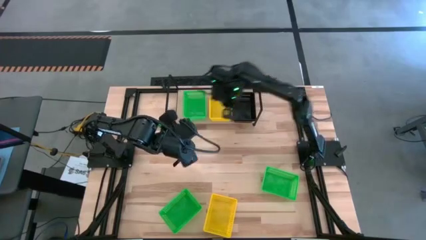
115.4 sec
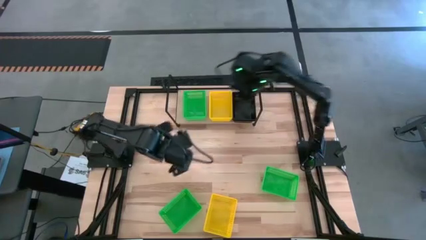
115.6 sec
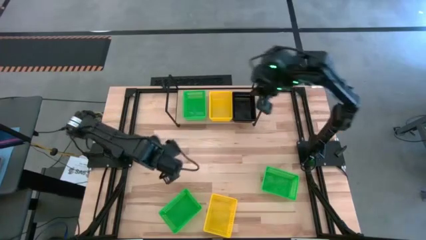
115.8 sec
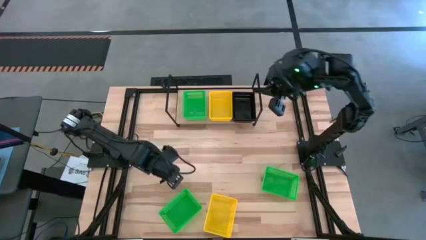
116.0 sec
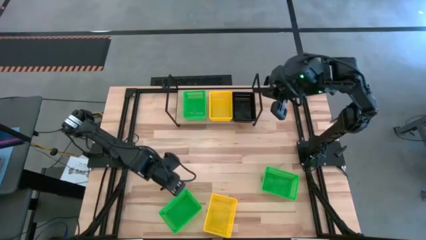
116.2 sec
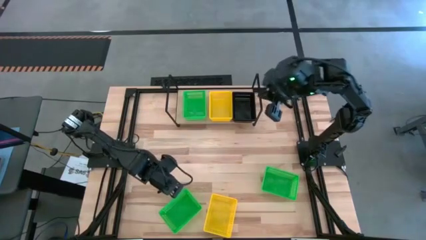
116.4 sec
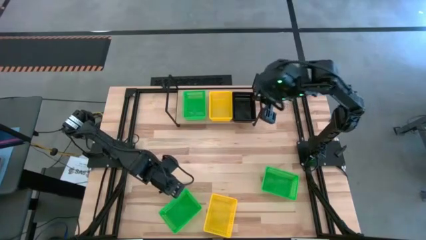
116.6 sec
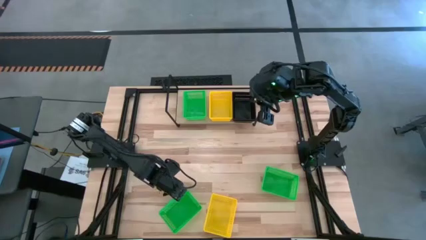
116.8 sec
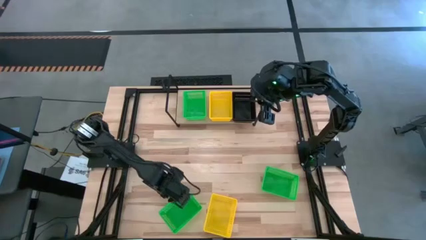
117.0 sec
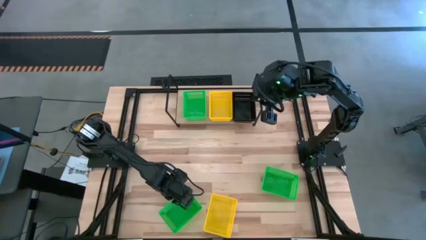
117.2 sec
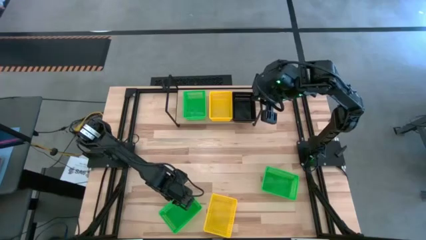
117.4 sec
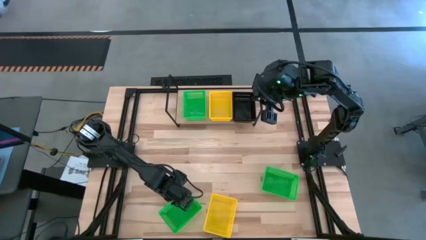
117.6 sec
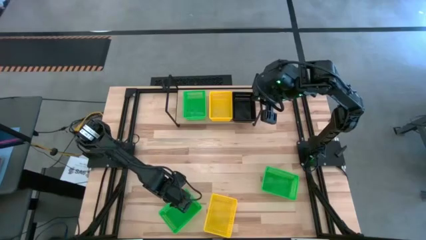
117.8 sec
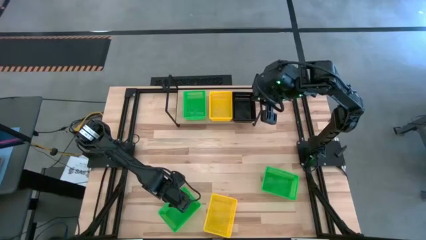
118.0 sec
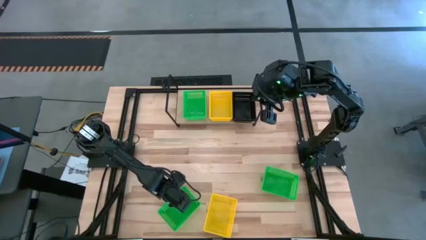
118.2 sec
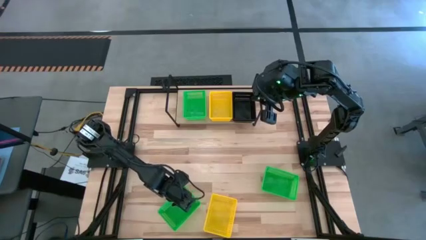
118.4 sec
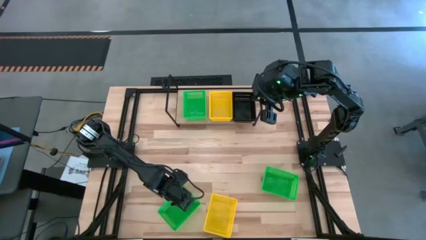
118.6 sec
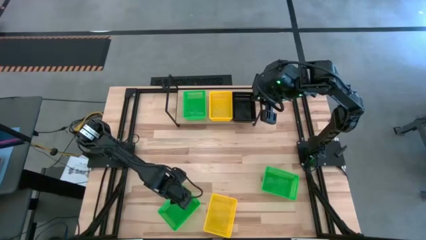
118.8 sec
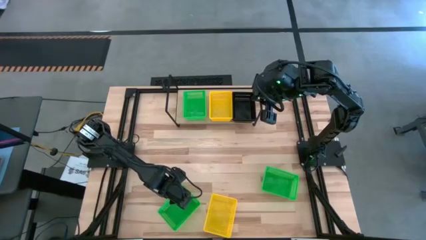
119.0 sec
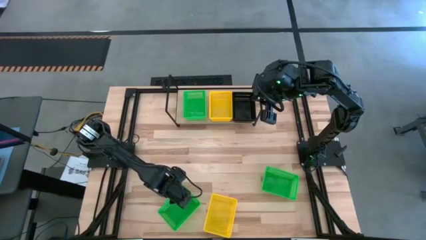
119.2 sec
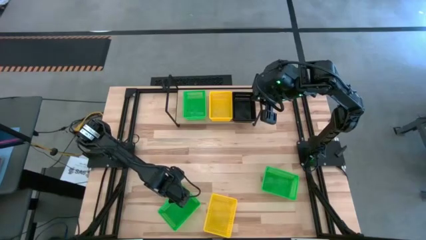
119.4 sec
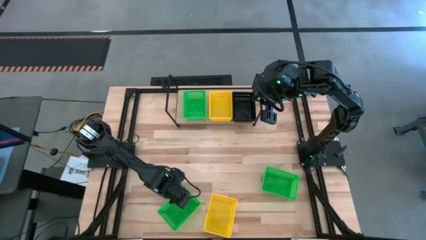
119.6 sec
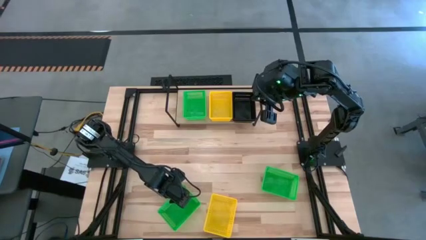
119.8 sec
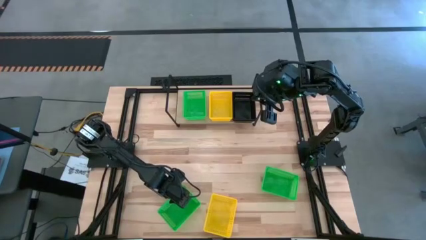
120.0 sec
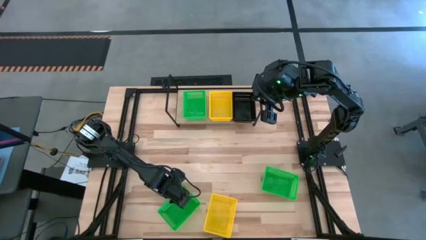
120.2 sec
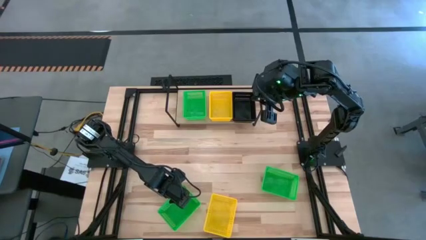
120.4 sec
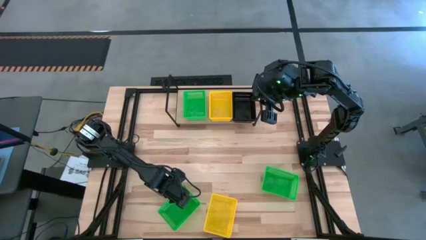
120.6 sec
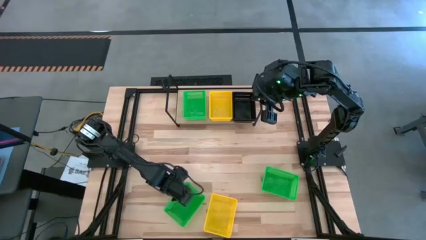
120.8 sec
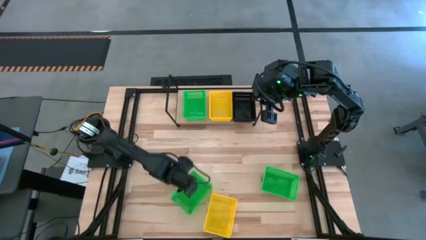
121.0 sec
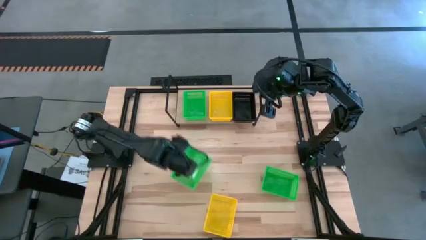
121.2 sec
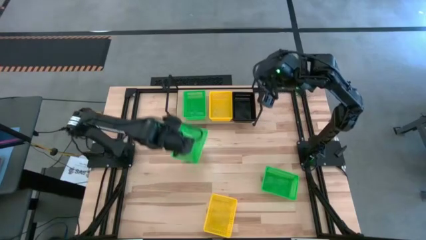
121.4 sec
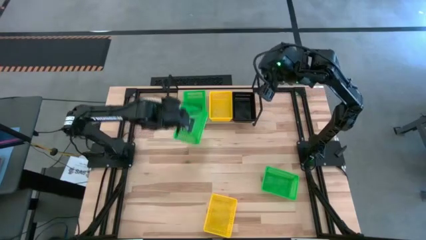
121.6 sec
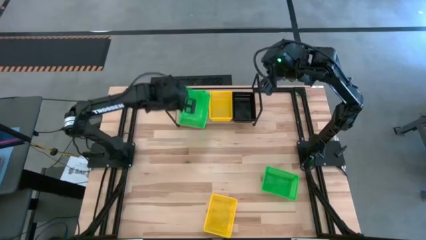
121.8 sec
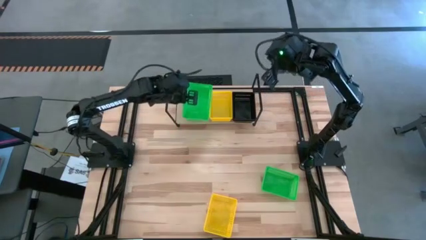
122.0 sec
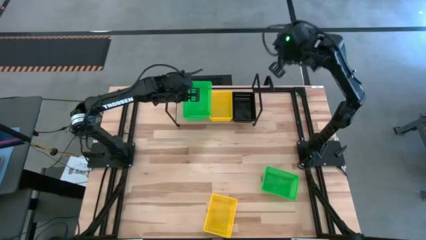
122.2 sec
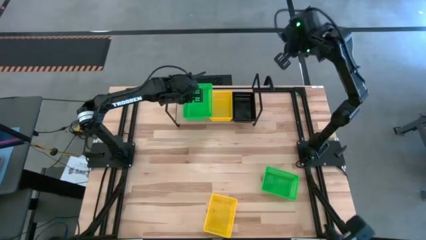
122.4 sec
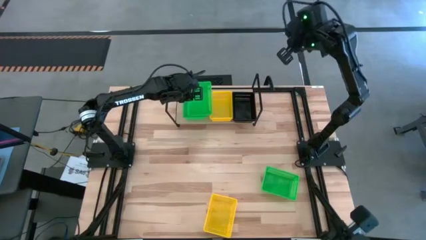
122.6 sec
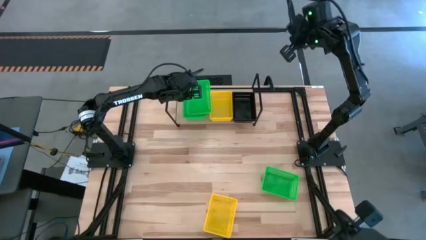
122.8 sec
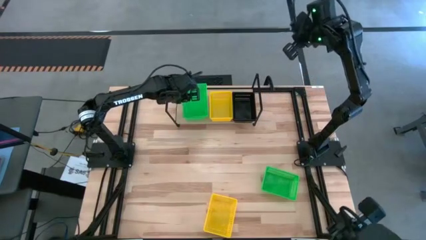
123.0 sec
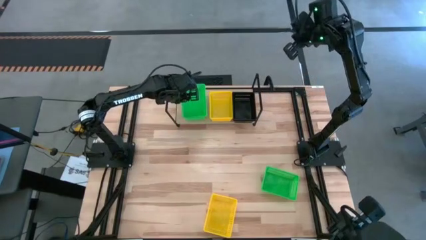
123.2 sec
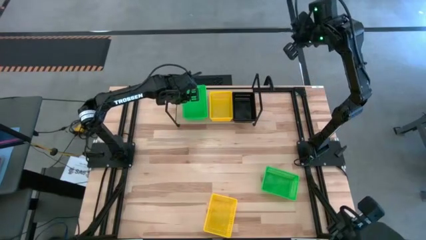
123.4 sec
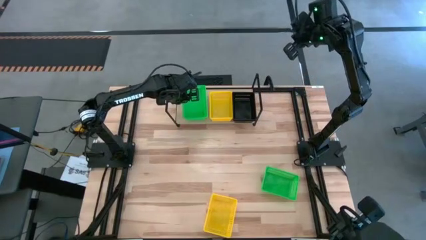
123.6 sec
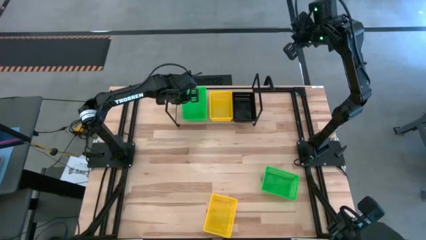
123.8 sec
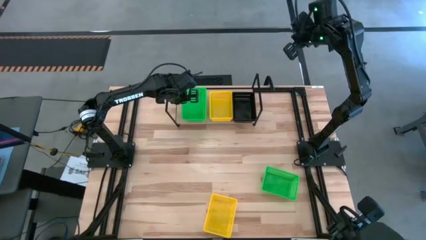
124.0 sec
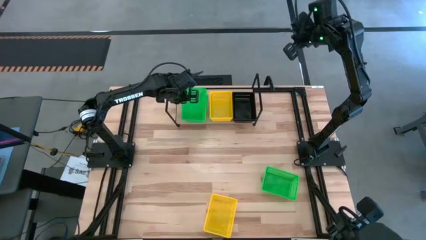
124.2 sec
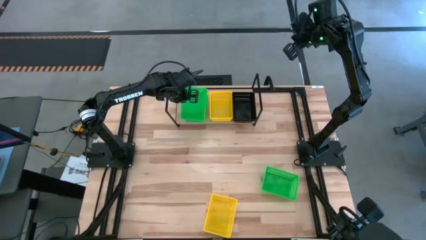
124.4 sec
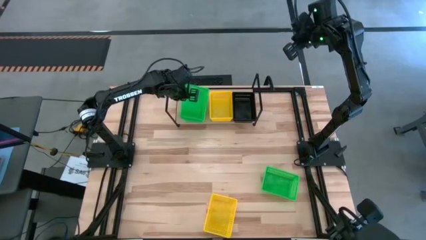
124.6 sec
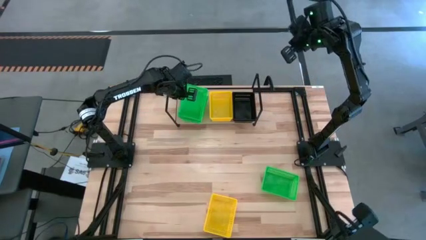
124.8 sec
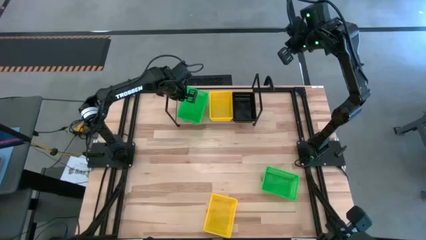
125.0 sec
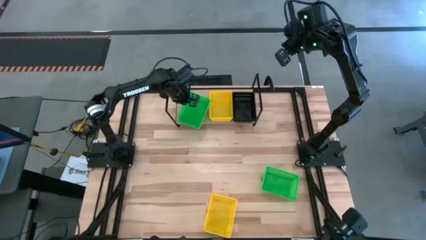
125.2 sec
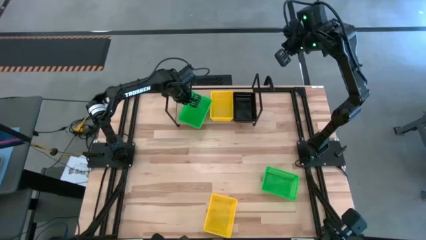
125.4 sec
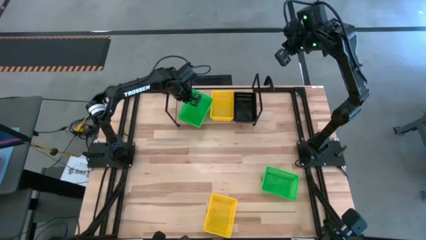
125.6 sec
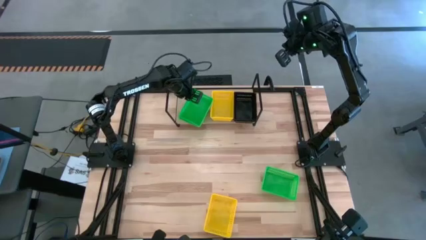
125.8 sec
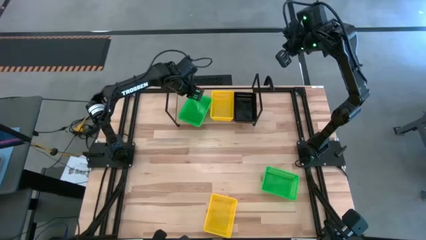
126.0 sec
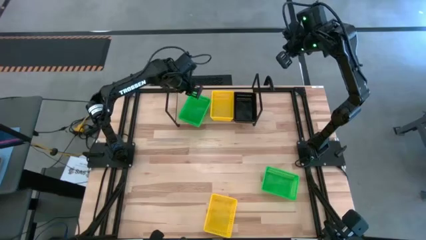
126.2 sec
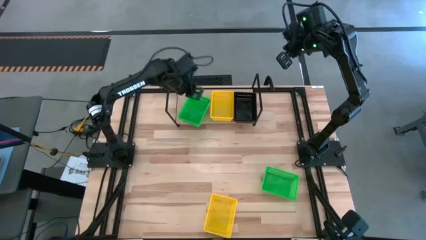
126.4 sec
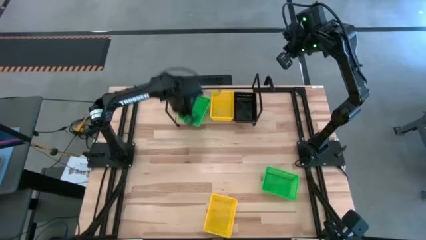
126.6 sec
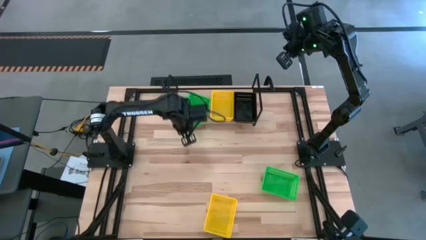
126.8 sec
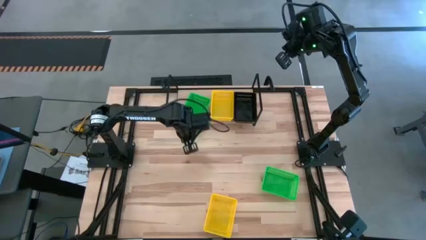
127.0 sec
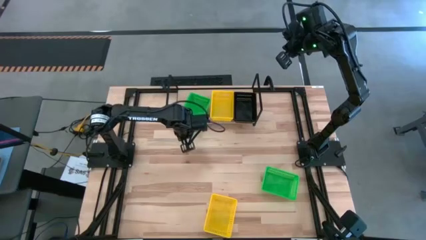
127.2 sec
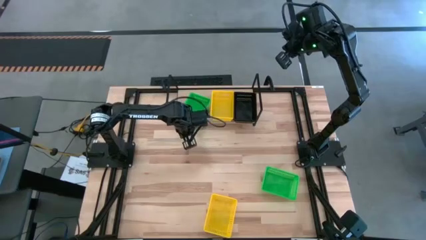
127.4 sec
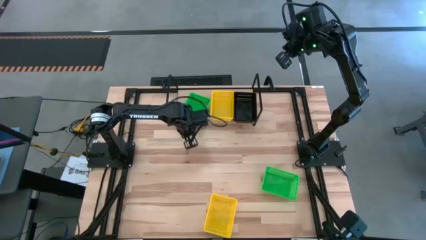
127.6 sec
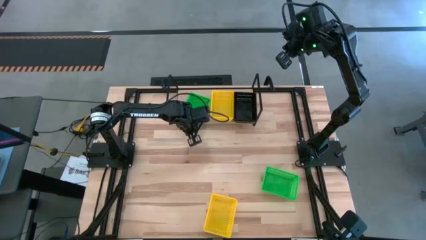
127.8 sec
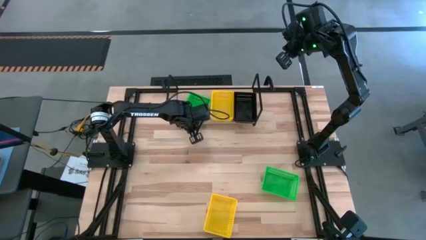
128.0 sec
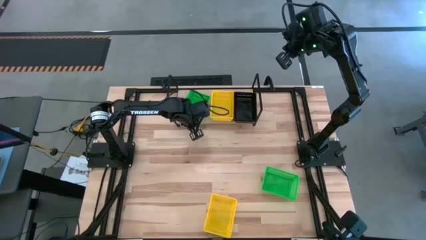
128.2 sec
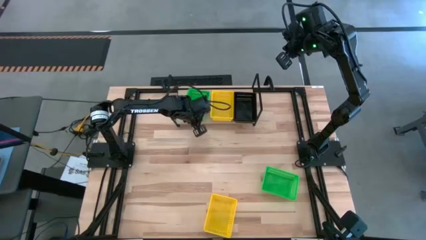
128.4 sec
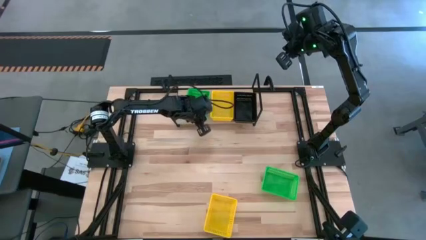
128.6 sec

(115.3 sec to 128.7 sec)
Task: Stack baskets on shelf by color
Stack the bottom green bin on the top of the other green bin on the shelf

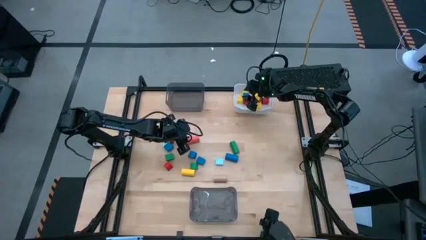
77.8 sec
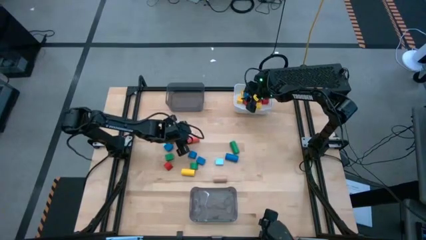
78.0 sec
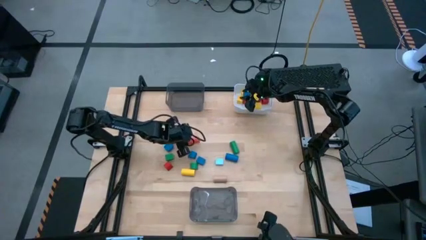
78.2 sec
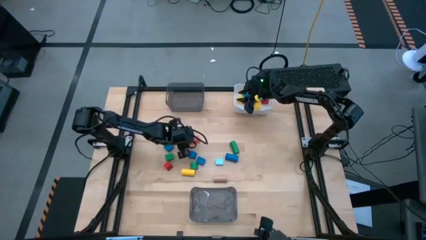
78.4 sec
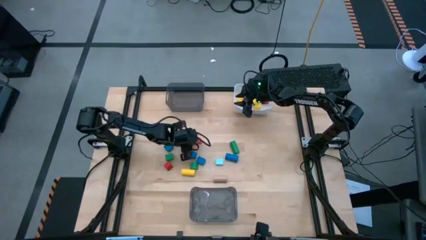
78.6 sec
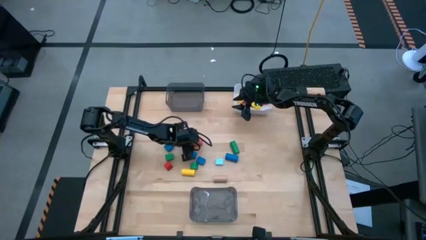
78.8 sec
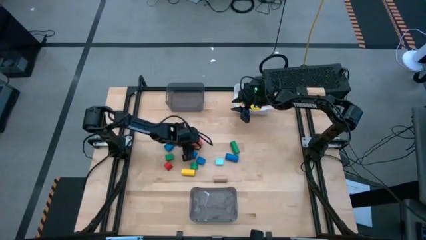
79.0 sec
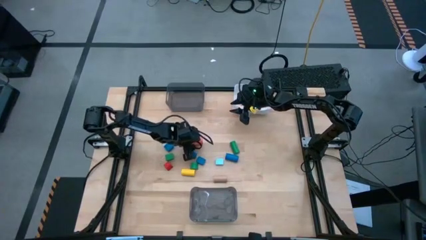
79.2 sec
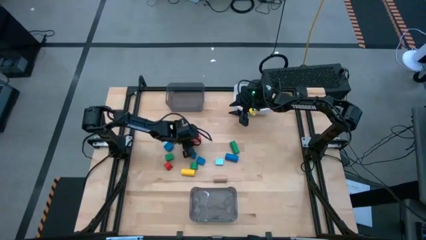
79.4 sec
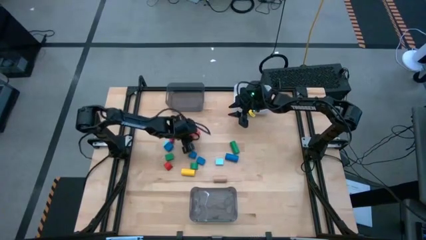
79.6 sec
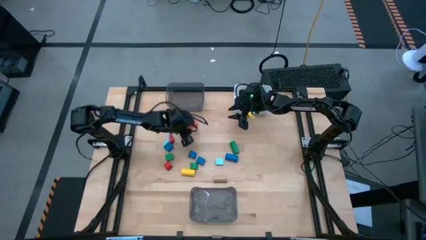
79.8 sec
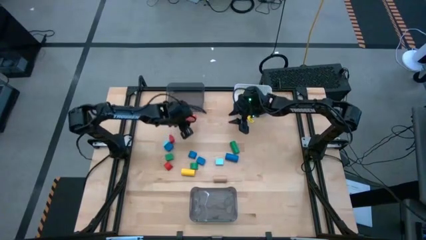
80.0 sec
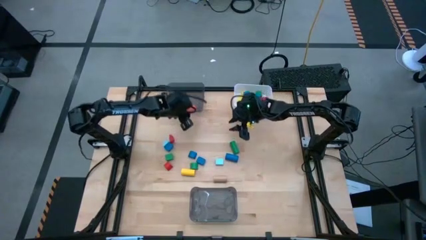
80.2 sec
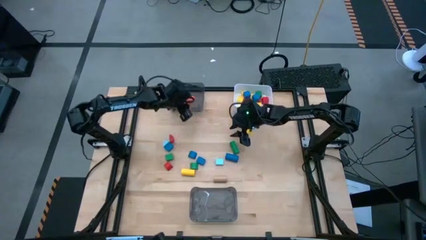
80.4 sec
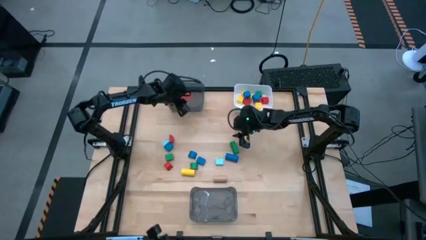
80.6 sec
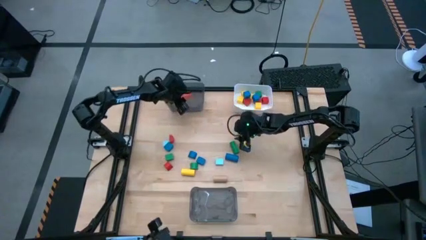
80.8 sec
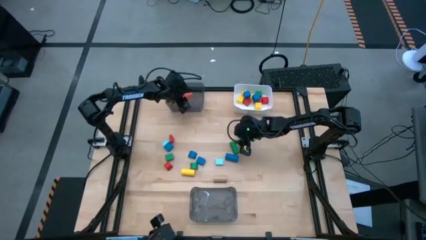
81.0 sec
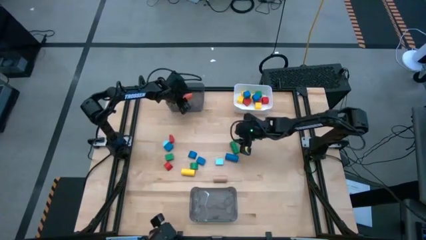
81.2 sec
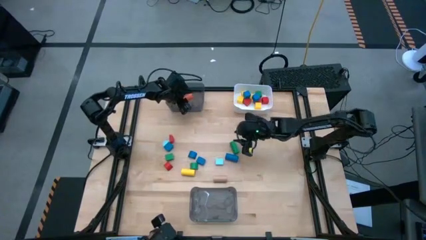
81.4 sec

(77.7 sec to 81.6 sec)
Task: Sort blocks by size
Put the orange cylinder block into the top black bin
